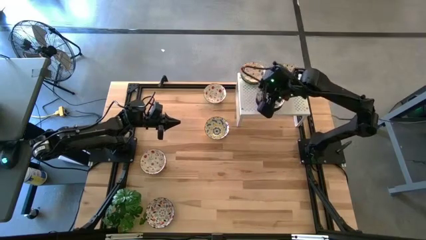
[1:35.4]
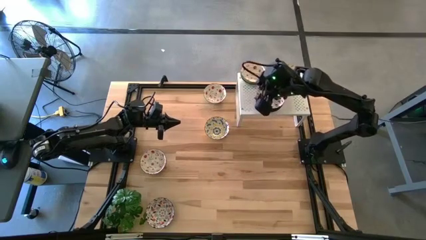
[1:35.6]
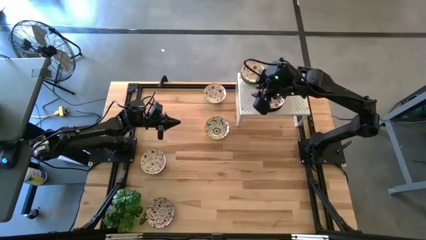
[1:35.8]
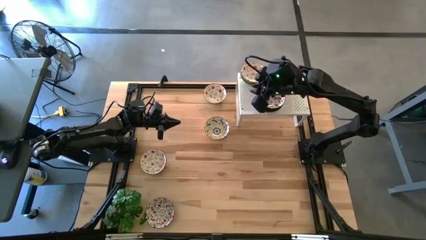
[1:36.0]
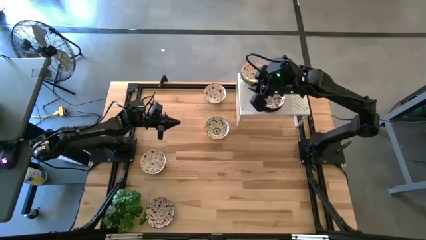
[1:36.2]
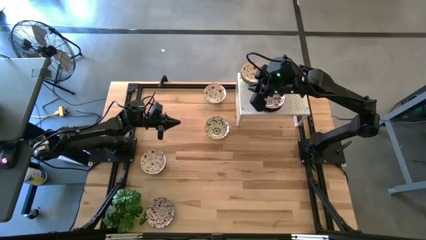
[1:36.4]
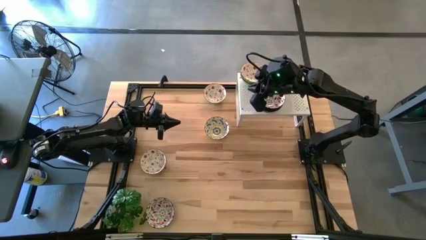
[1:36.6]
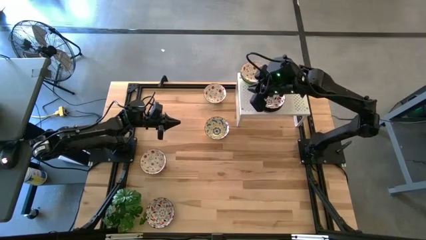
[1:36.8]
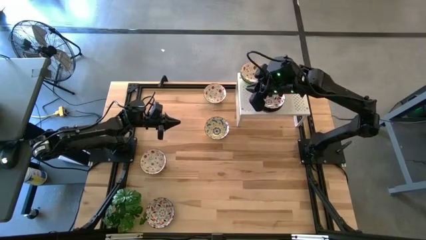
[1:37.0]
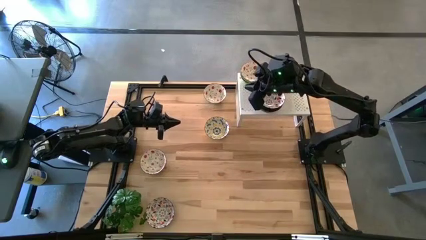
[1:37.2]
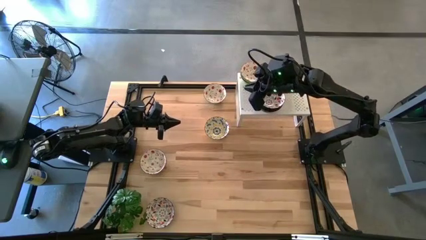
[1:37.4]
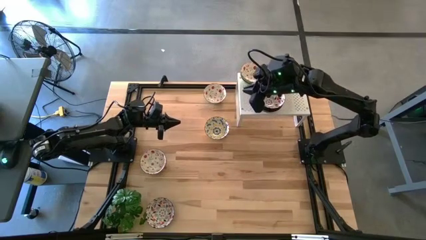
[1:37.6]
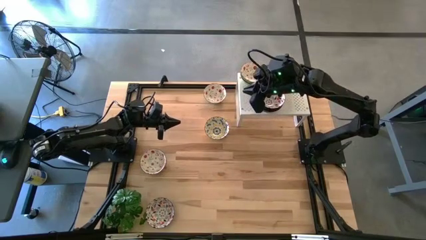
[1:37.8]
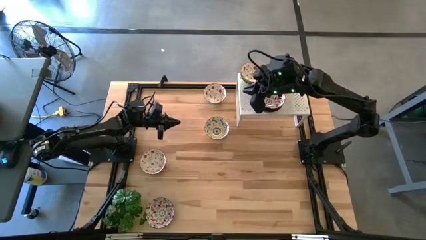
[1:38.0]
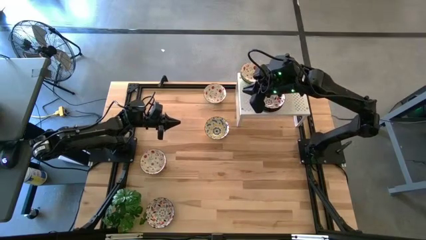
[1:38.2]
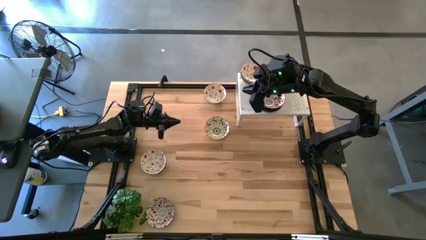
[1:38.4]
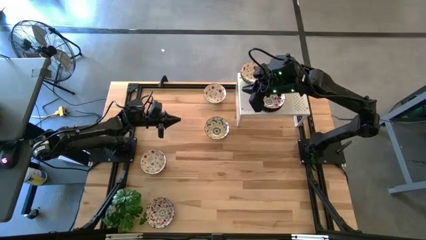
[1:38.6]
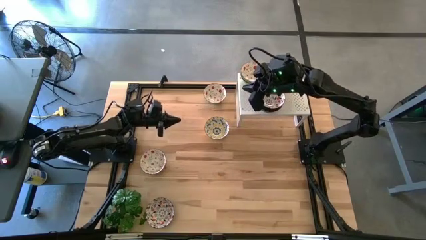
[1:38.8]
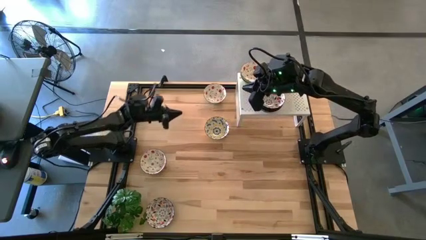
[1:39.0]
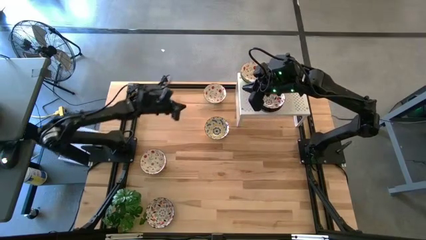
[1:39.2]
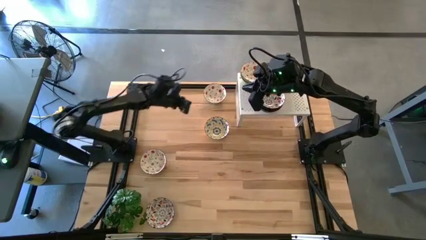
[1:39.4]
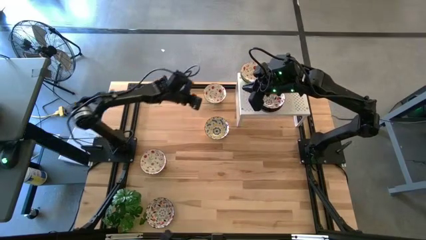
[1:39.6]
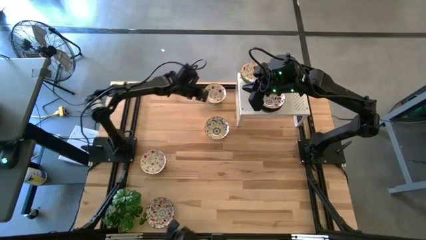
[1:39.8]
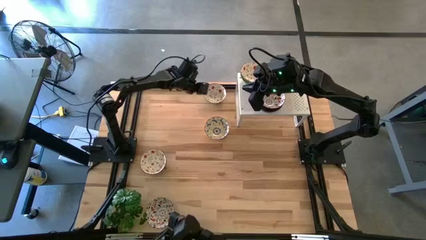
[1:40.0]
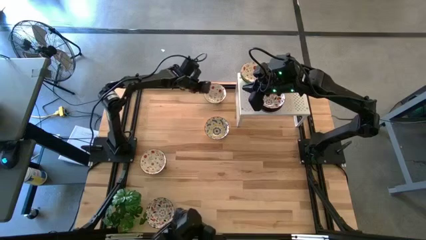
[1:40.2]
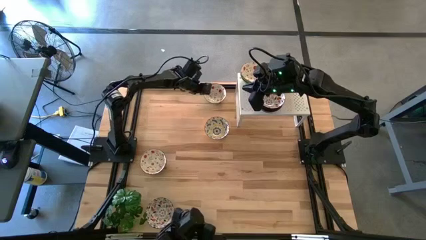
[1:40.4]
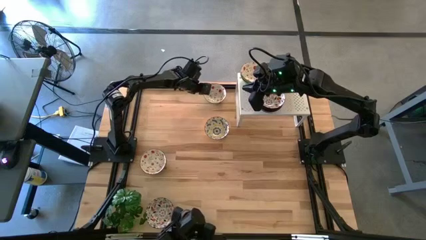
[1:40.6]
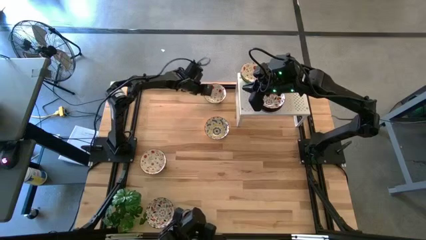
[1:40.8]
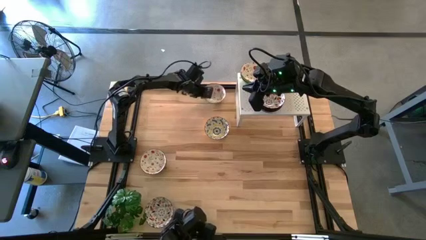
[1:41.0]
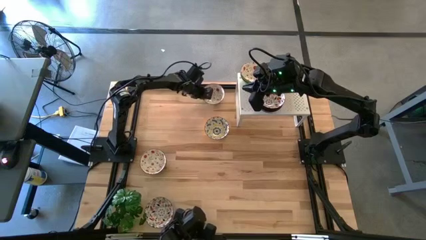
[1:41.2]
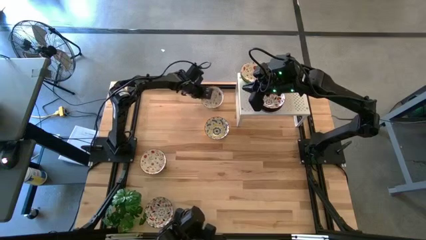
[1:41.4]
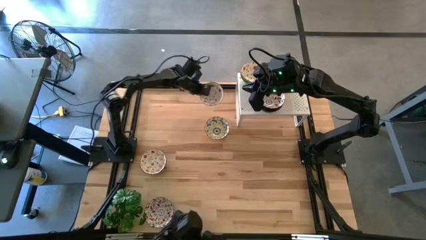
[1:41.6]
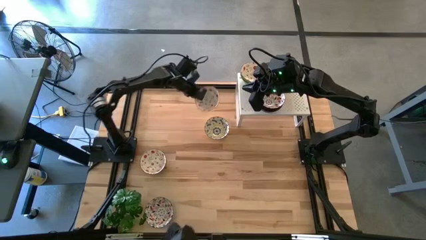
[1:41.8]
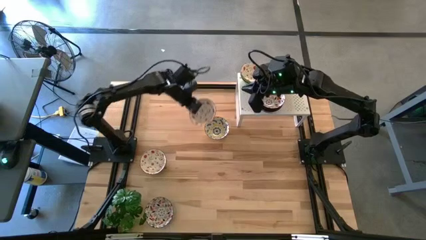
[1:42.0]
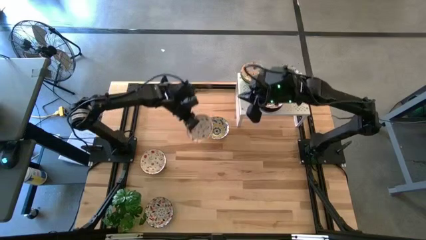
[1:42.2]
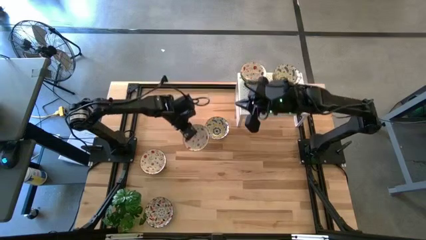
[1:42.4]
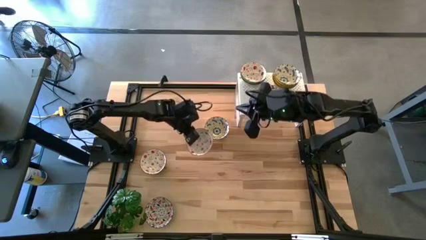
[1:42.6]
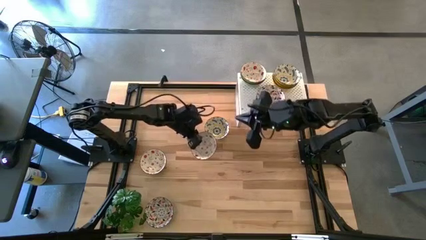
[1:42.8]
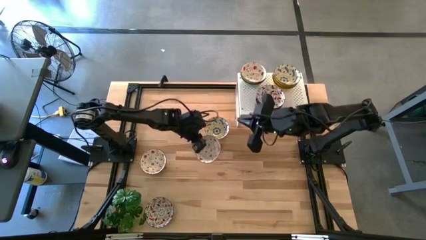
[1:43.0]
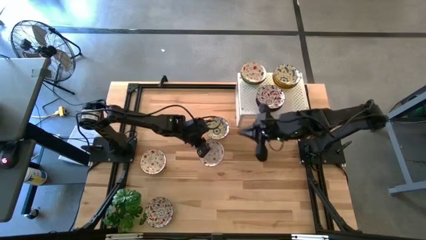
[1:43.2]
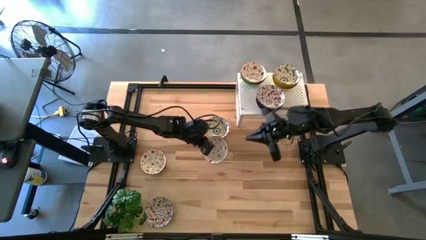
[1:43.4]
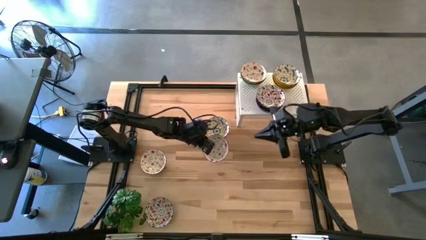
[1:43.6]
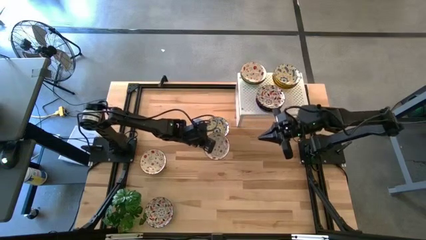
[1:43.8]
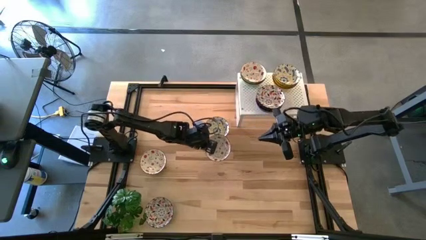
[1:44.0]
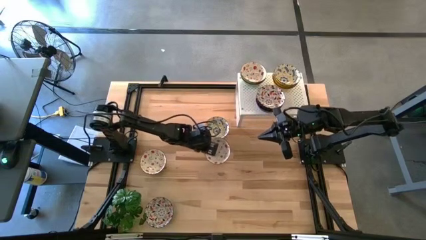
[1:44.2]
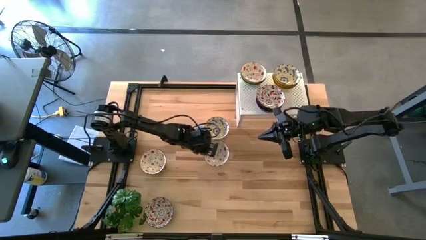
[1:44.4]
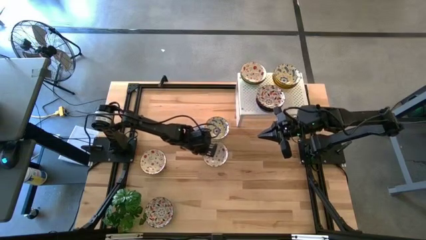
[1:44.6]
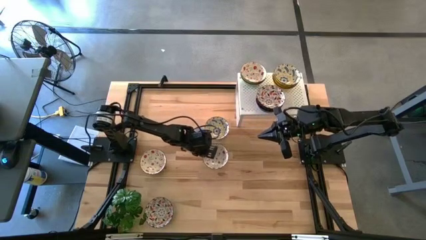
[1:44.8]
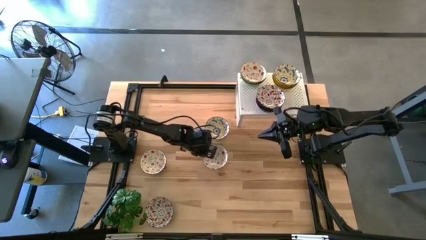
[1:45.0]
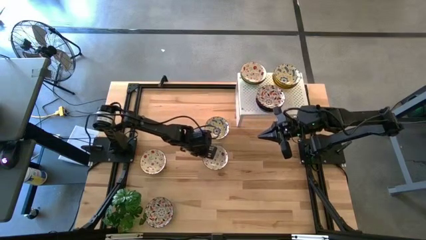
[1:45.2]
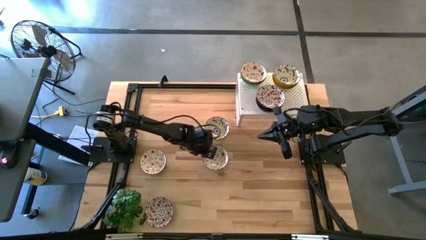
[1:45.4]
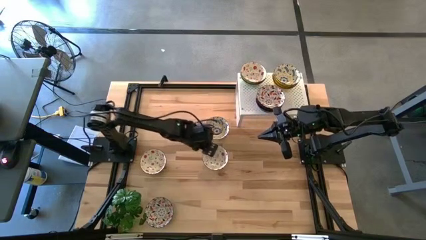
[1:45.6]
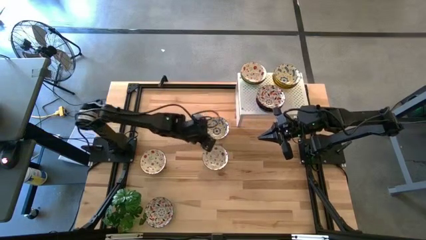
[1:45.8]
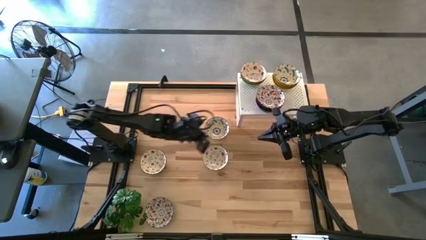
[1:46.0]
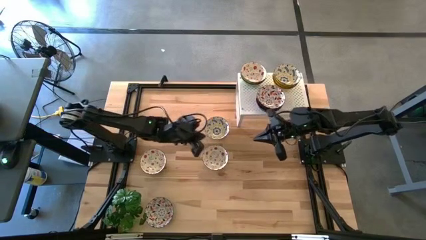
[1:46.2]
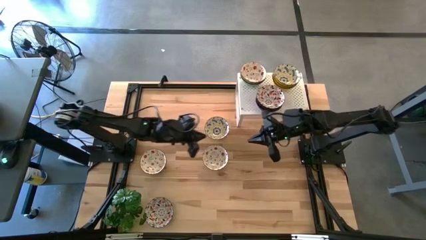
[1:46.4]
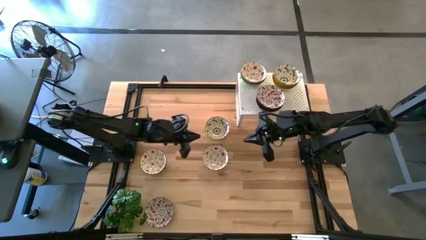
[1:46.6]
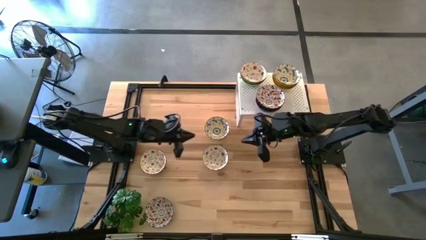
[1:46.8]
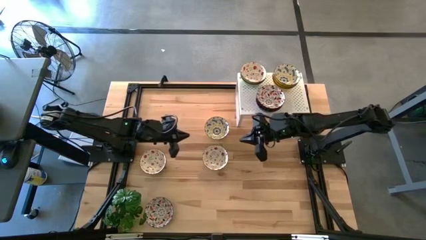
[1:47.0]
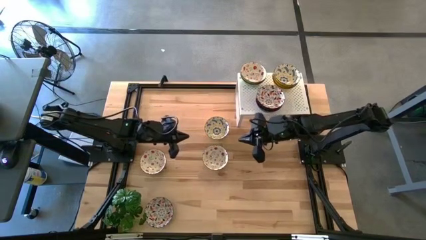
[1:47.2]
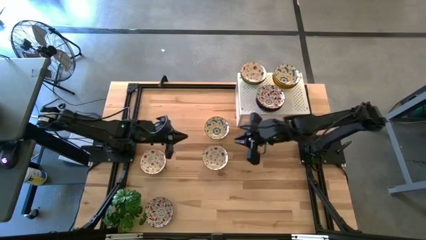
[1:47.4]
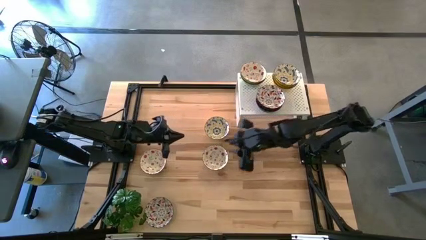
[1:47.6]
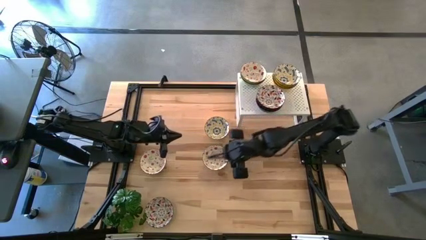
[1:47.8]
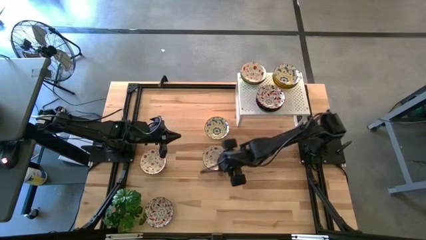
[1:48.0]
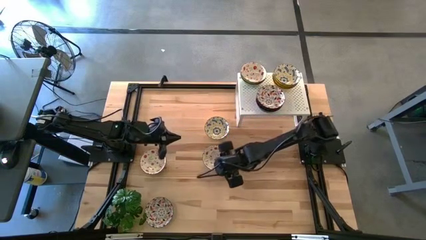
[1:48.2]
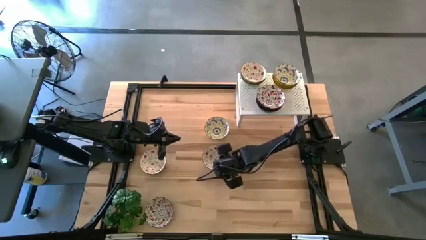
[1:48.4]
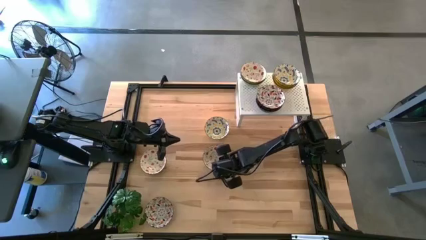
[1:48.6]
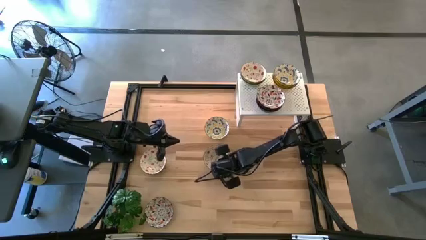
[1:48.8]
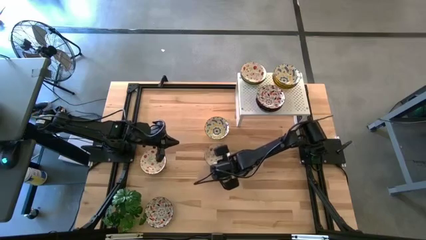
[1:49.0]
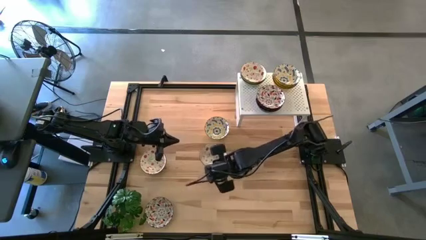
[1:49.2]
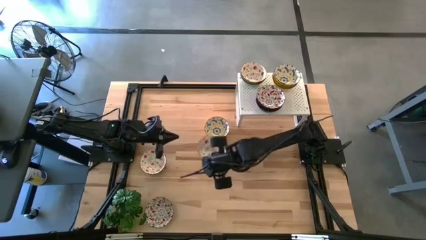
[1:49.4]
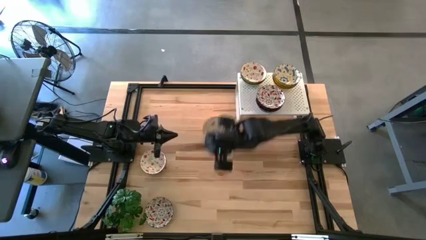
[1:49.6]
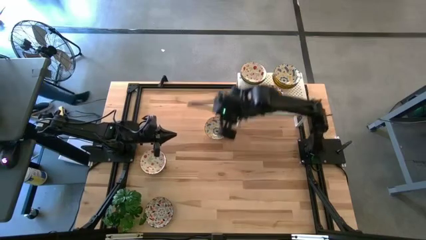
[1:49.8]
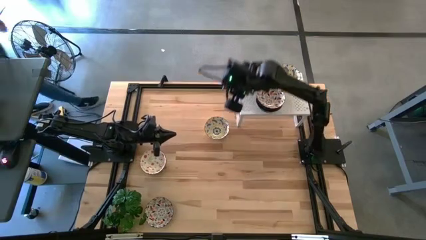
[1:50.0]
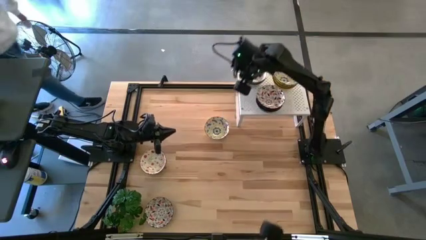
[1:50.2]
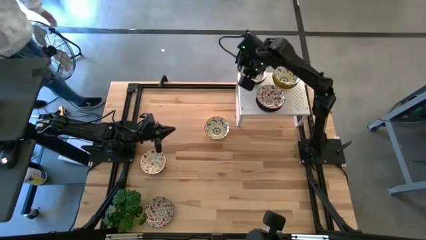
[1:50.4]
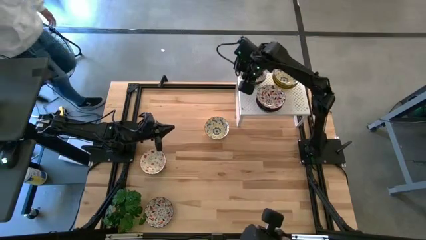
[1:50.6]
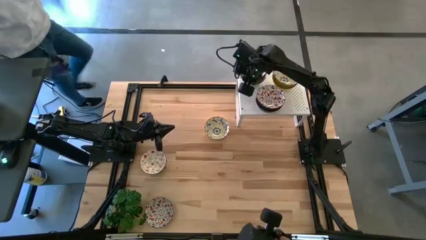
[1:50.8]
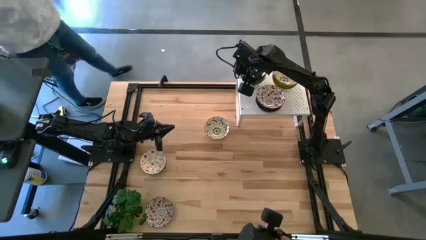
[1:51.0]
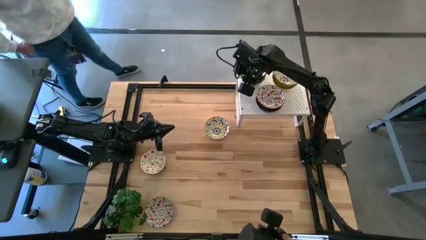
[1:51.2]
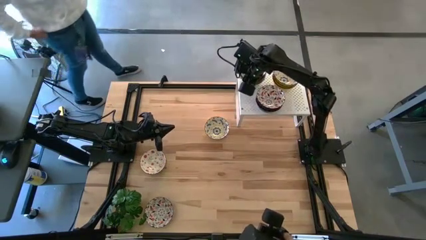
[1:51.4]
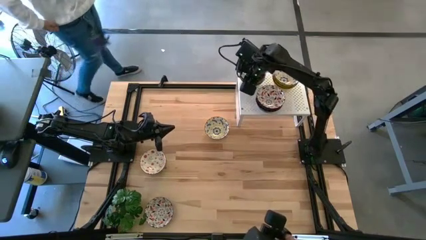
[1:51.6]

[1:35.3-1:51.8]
Task: Pick & Place Mini bowls
Stack the green patterned bowl on top of the green bowl on the shelf
